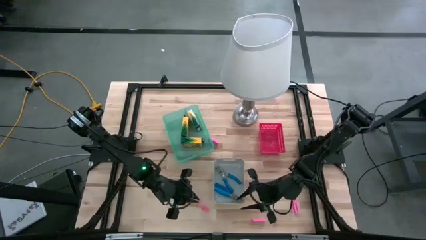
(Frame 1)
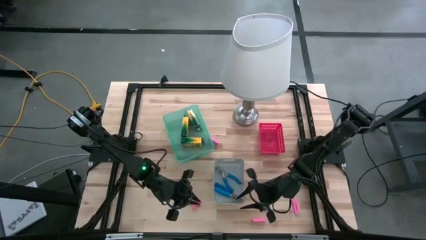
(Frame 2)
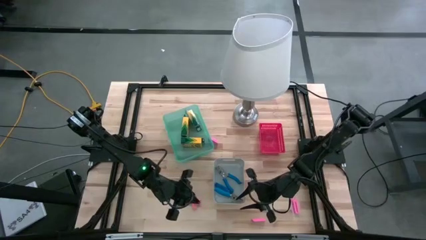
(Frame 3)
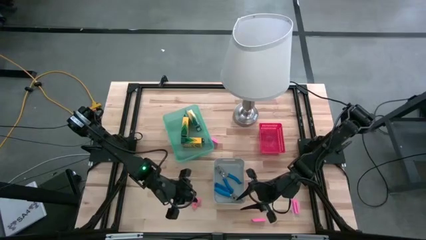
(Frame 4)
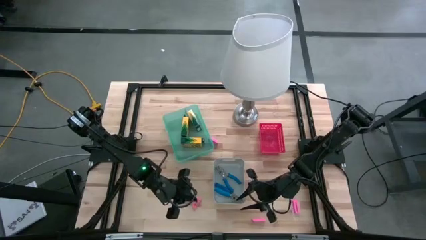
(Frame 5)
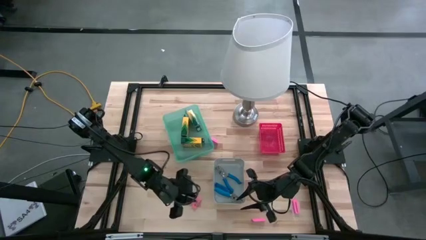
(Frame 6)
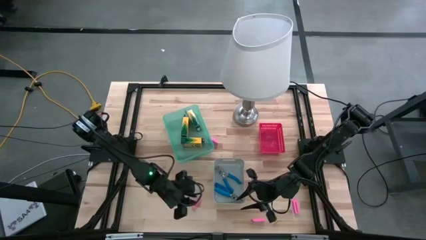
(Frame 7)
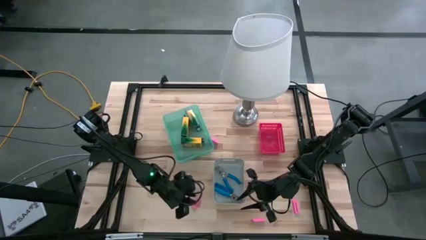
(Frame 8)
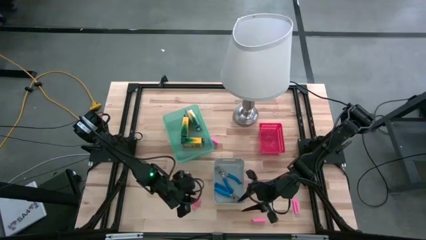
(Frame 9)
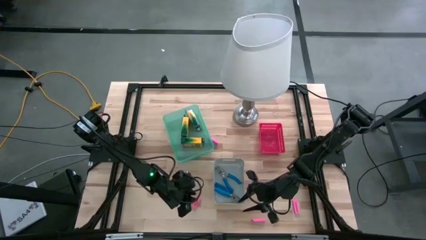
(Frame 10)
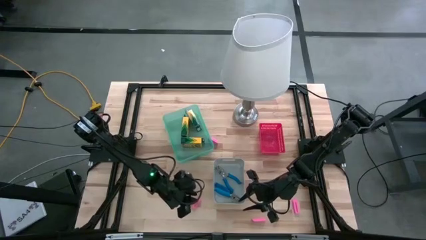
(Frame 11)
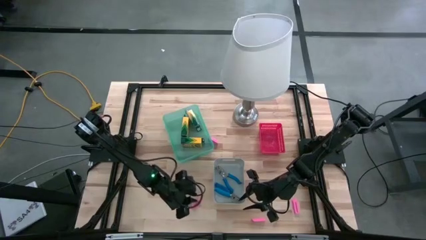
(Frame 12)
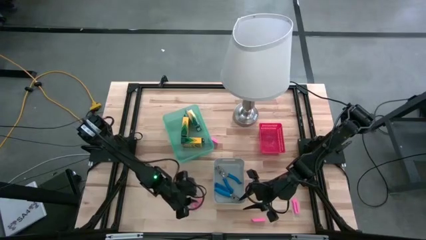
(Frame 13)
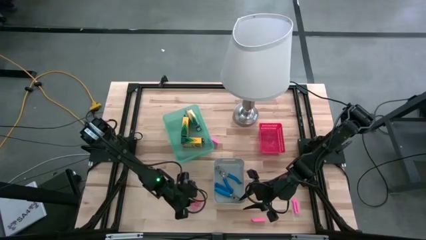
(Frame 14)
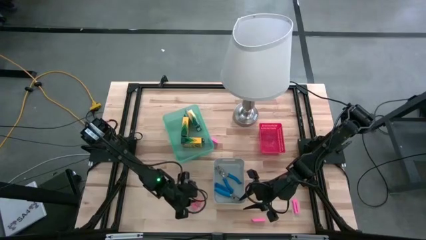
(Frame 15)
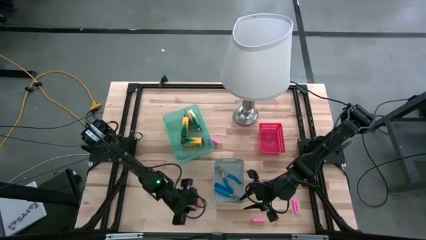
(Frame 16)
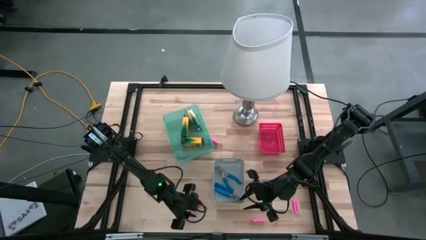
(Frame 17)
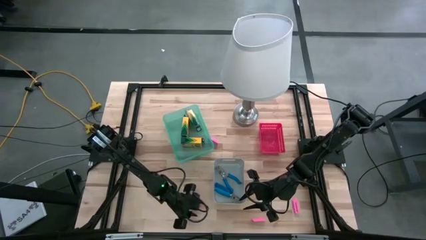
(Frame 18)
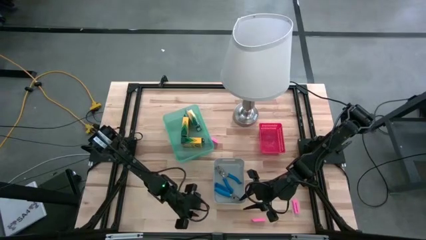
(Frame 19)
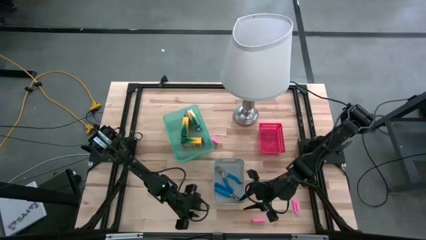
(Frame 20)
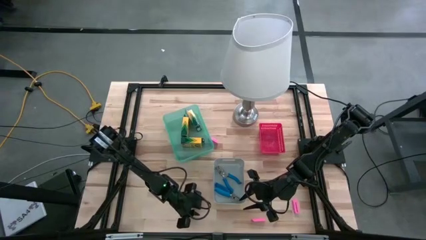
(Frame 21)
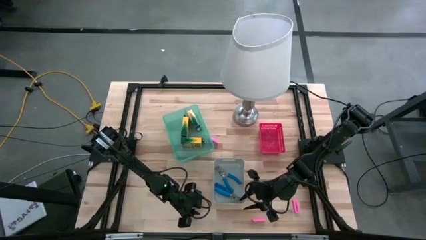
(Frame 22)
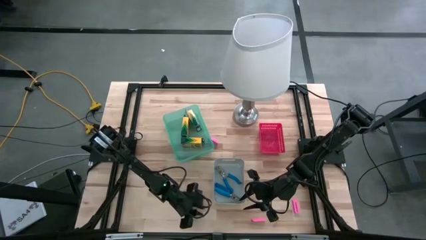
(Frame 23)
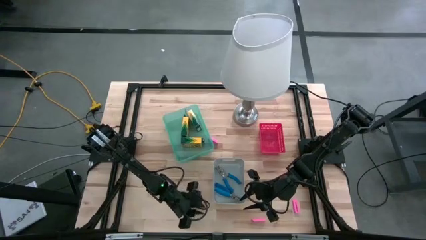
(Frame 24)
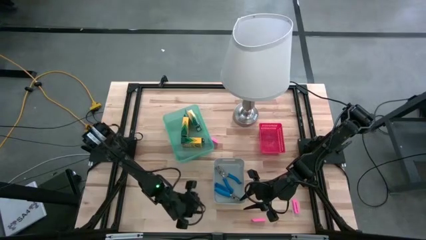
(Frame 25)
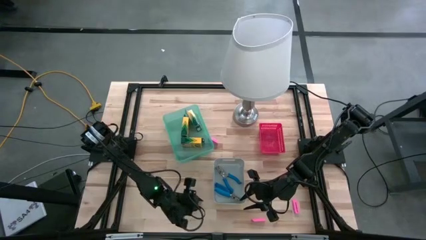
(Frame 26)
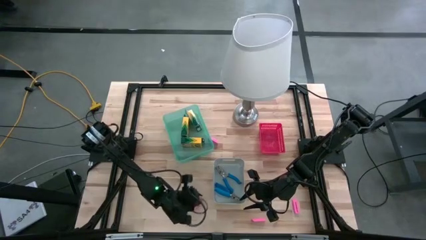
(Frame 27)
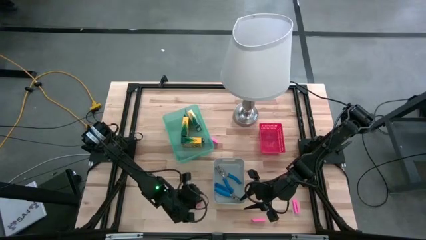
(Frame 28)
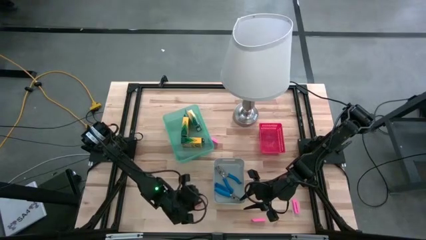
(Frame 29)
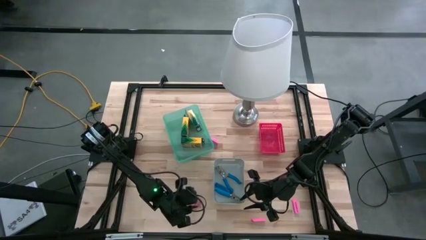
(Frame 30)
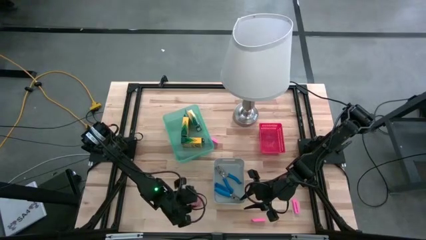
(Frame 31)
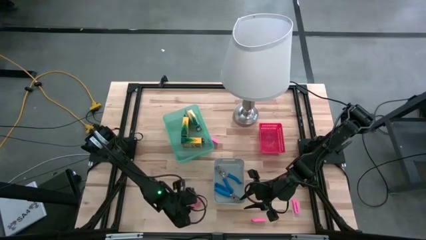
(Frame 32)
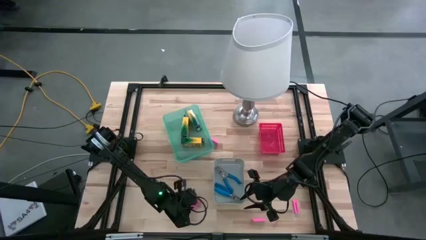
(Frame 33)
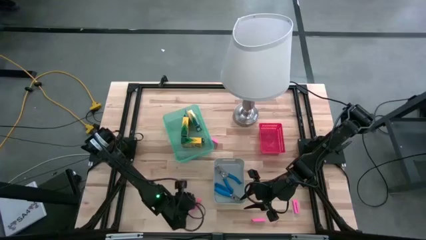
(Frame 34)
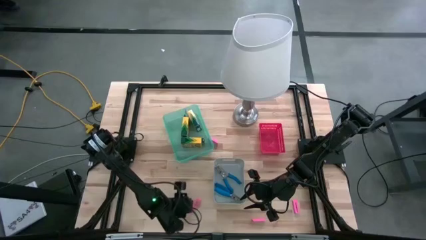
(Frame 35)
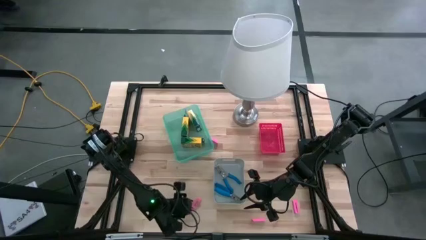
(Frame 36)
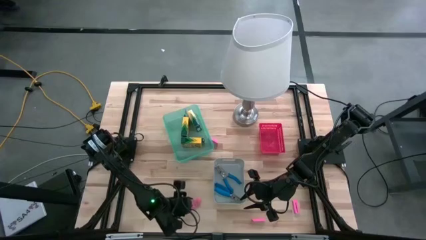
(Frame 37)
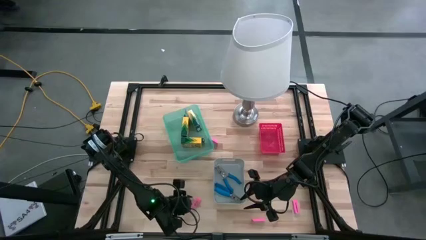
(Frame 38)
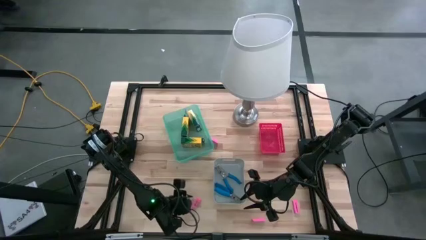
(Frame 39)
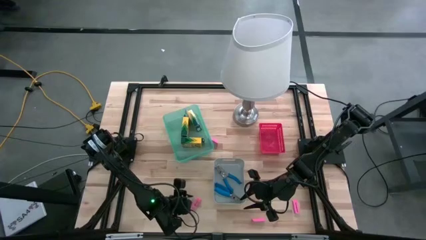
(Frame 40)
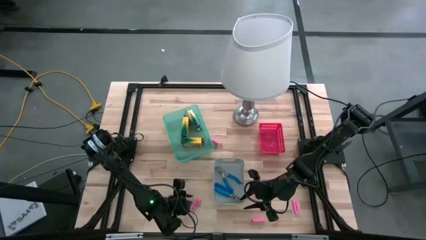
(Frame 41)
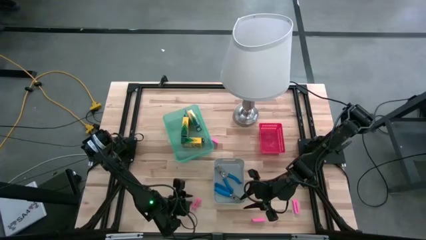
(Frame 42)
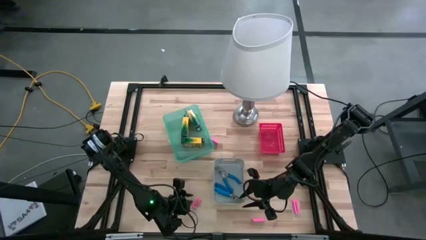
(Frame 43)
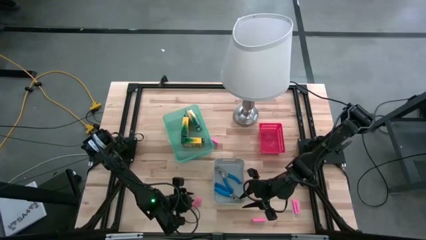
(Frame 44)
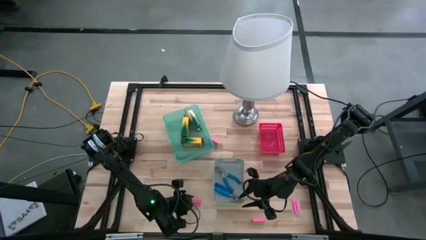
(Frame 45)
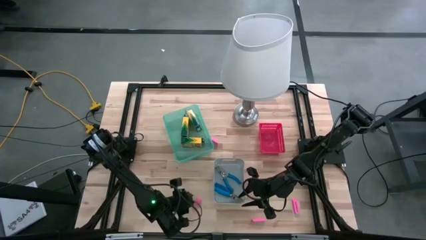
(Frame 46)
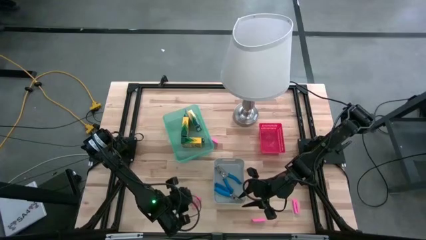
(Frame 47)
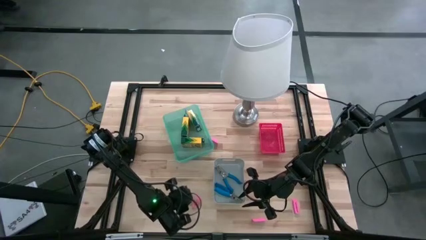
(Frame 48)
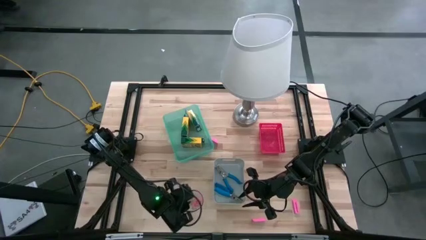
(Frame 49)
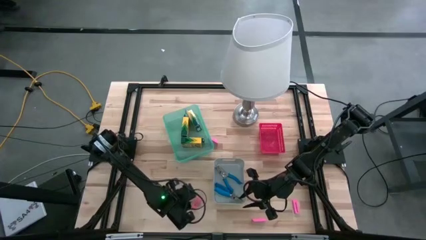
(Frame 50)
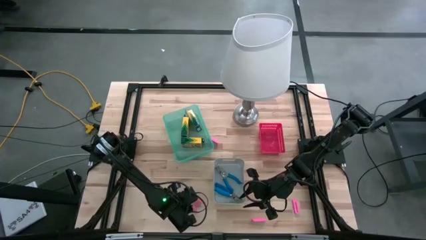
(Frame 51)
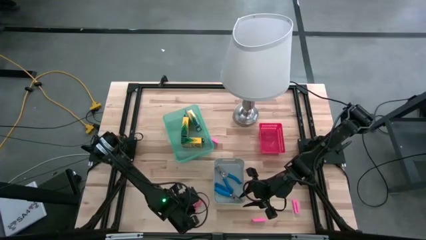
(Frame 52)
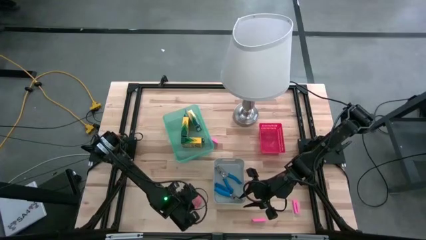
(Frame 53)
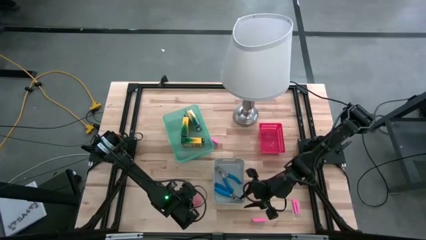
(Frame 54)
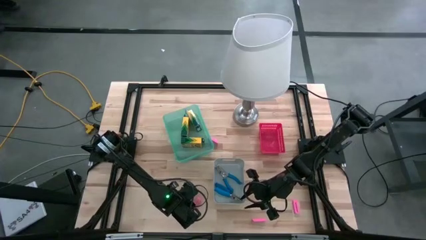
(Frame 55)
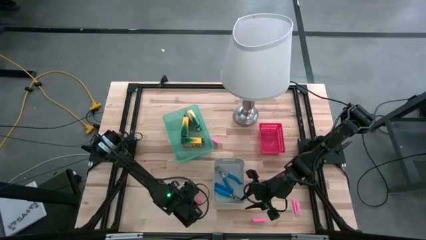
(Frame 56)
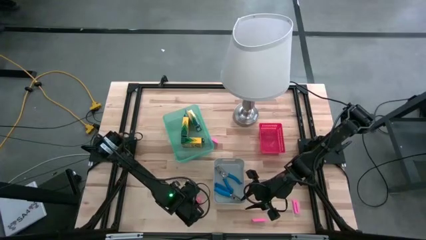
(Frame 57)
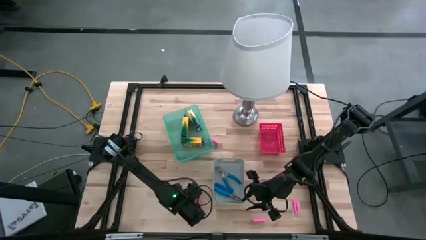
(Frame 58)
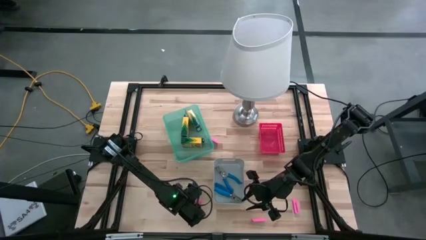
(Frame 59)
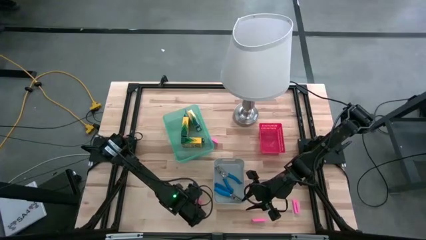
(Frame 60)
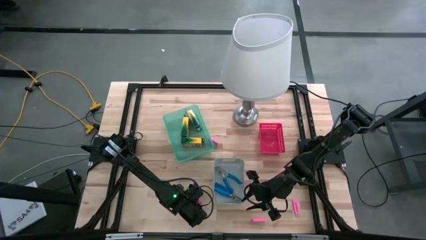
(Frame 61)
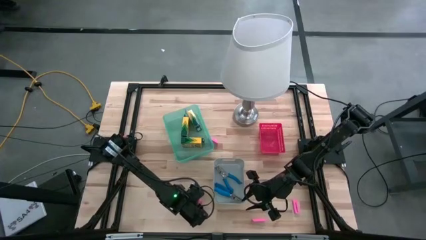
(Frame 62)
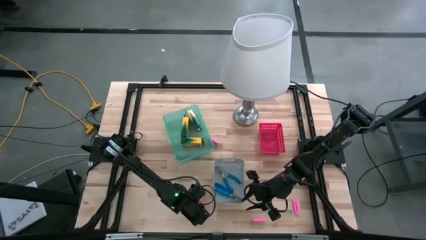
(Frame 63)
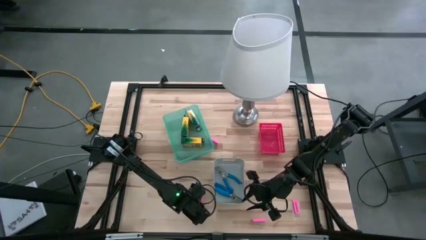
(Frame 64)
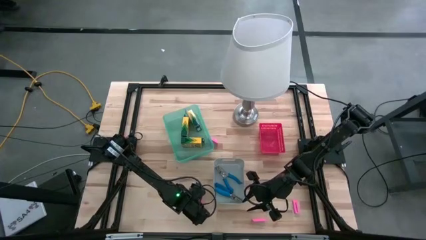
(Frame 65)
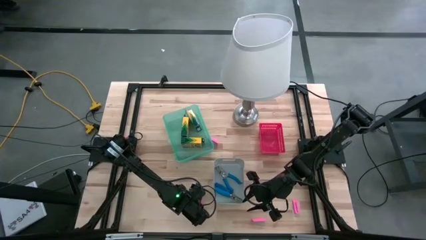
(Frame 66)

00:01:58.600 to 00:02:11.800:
Task: Pick & Place School Supplies
Put the pink eraser into the red bin

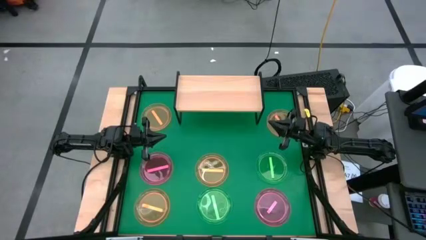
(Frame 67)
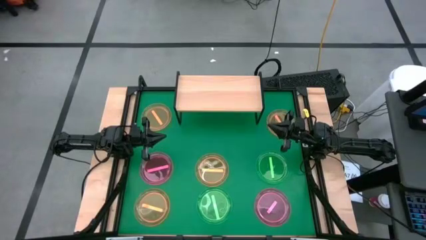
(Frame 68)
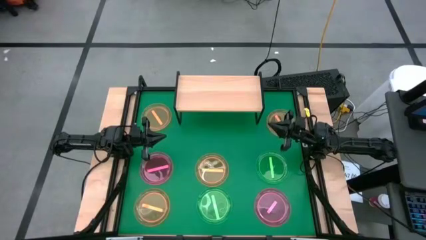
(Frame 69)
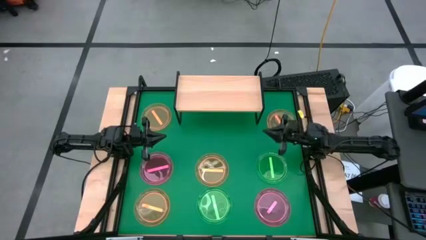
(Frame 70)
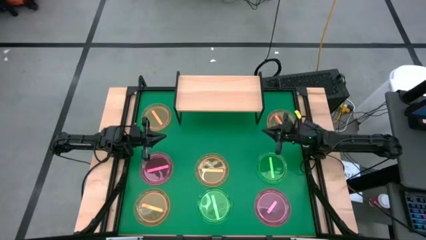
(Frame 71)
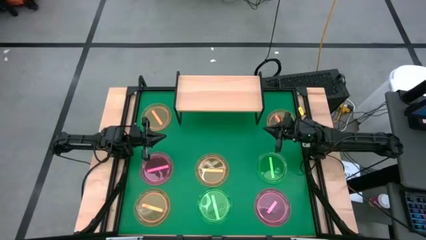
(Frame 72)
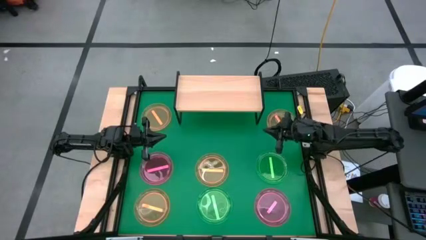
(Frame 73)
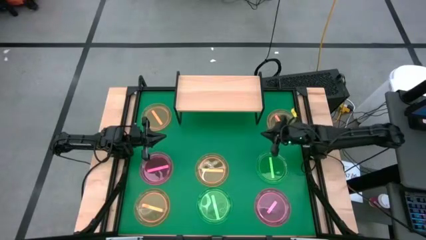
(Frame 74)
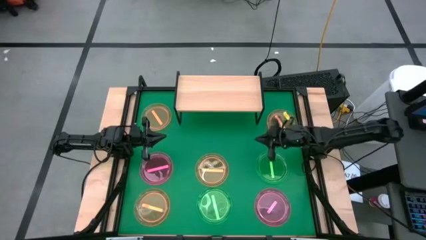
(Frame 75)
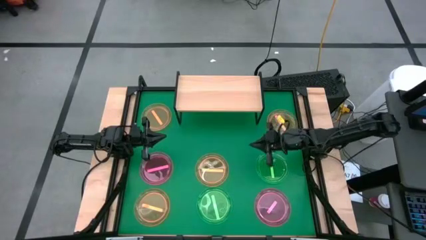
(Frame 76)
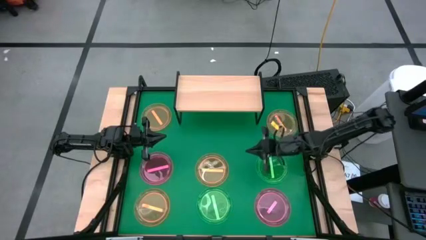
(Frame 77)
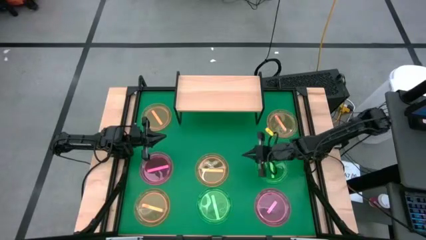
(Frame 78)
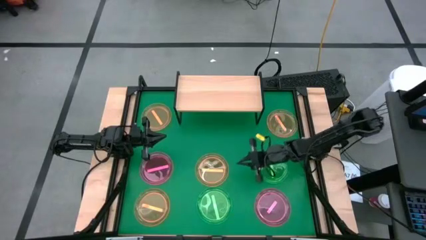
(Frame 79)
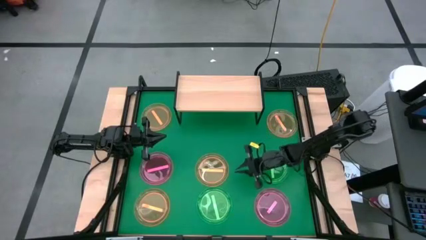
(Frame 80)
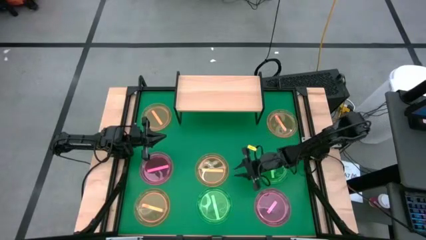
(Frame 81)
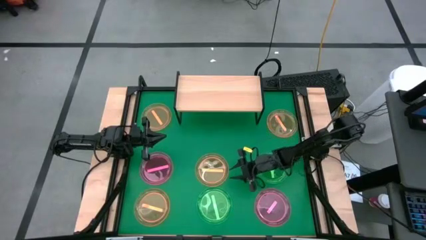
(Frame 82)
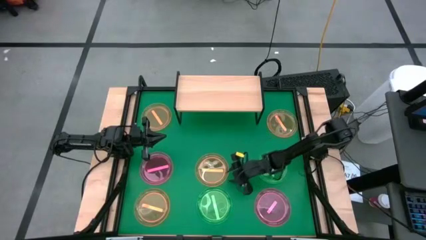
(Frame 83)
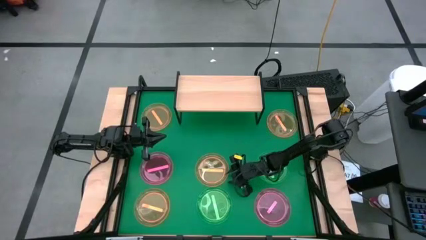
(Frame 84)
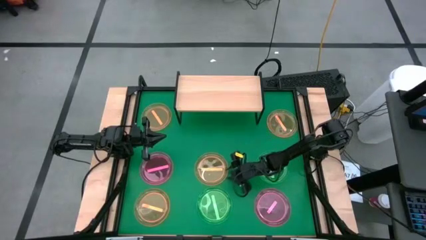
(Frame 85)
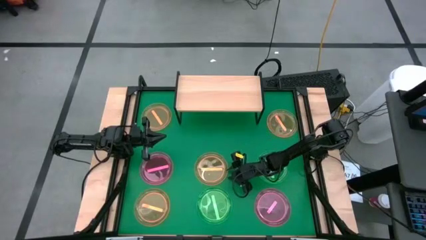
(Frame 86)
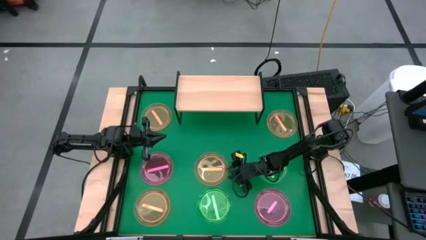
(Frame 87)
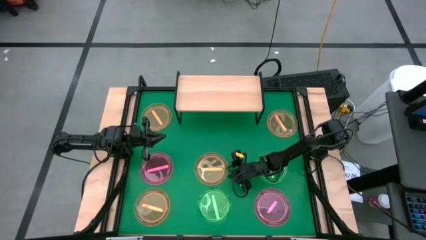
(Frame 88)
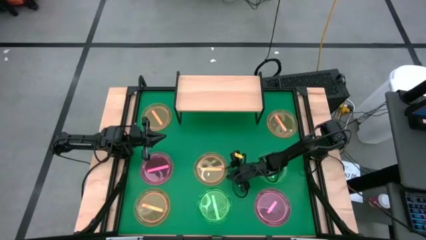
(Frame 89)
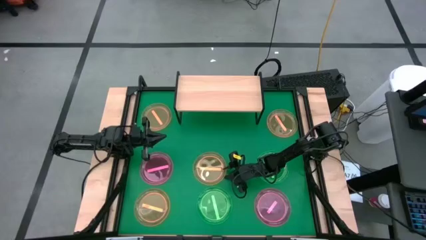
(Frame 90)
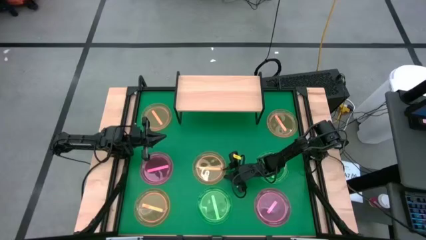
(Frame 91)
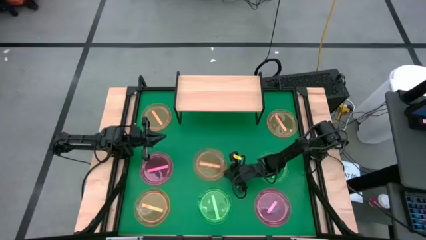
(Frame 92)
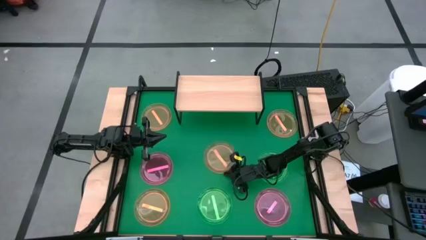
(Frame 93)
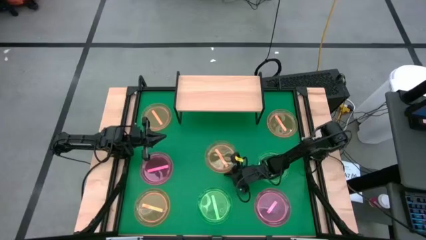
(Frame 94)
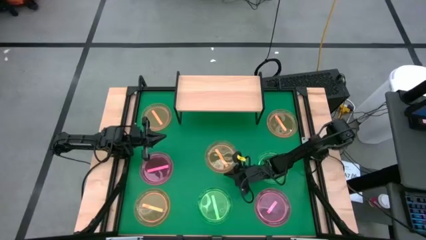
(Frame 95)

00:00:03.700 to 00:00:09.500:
Task: Place and stack plates onto a shelf
Put the orange plate on the shelf
